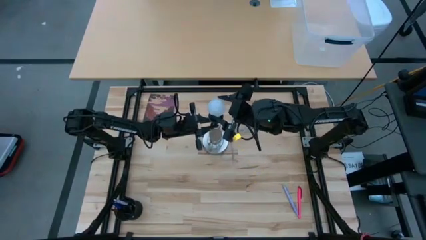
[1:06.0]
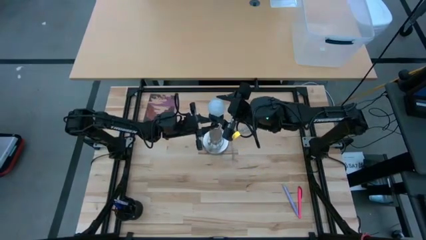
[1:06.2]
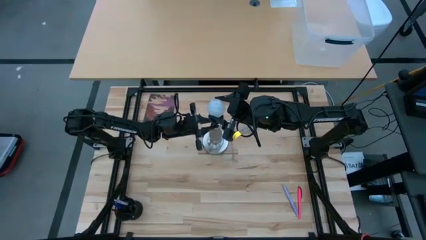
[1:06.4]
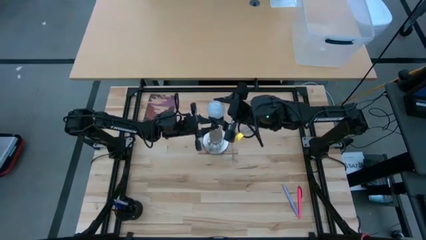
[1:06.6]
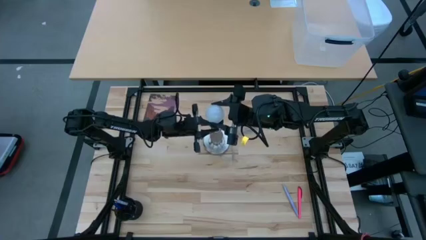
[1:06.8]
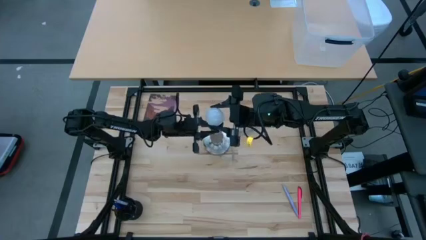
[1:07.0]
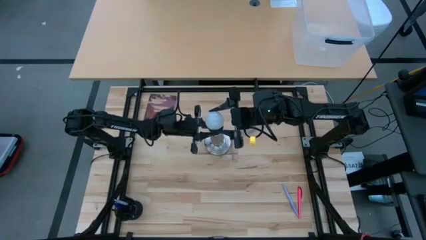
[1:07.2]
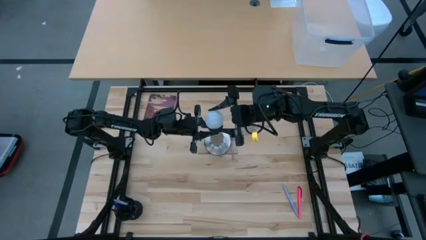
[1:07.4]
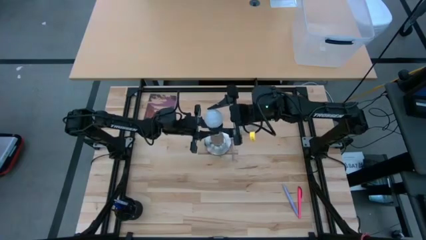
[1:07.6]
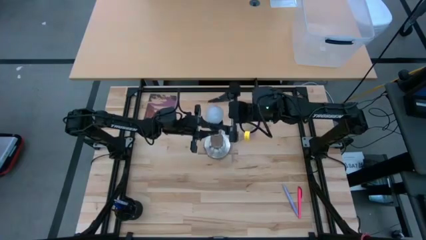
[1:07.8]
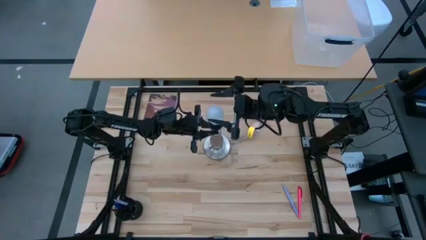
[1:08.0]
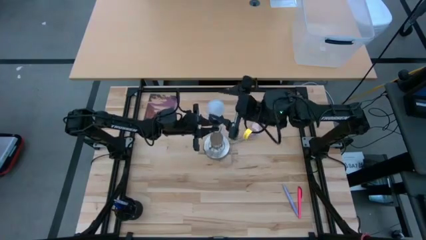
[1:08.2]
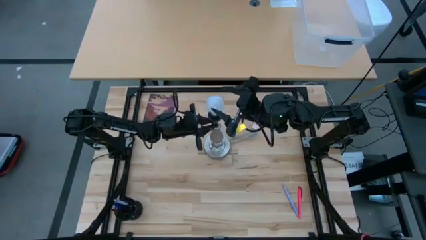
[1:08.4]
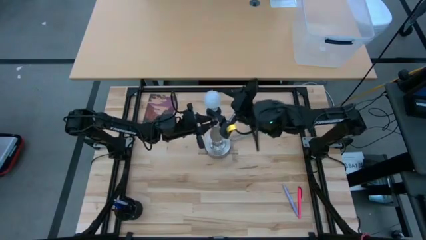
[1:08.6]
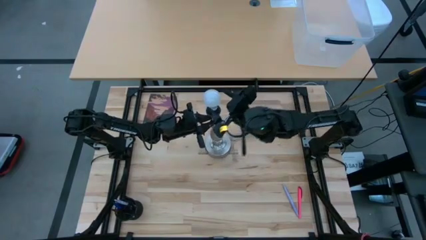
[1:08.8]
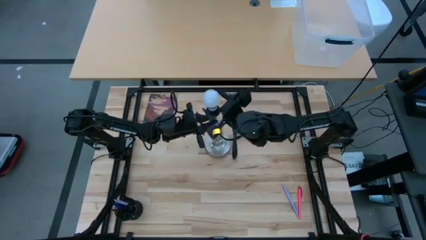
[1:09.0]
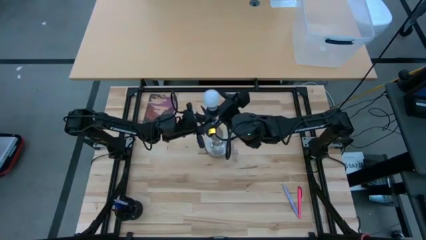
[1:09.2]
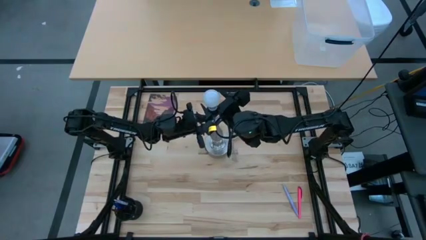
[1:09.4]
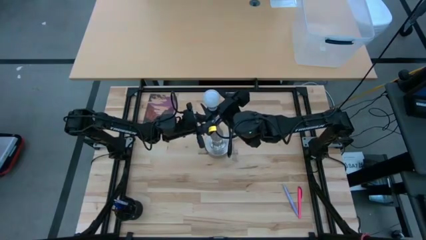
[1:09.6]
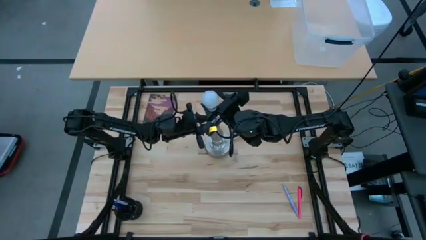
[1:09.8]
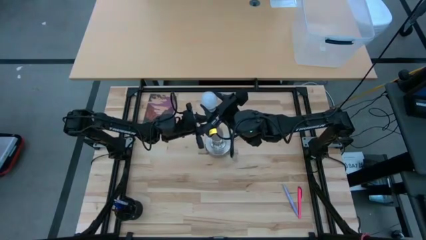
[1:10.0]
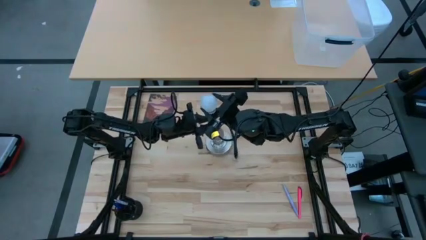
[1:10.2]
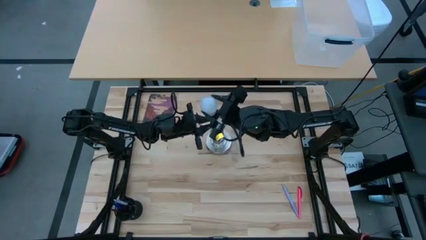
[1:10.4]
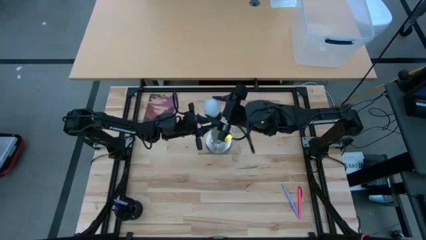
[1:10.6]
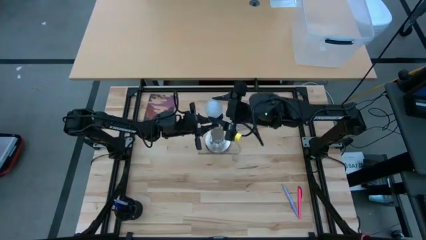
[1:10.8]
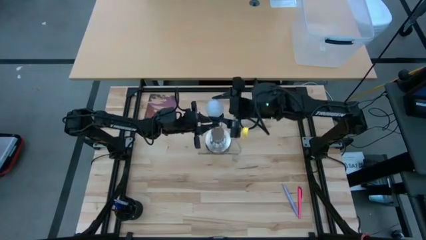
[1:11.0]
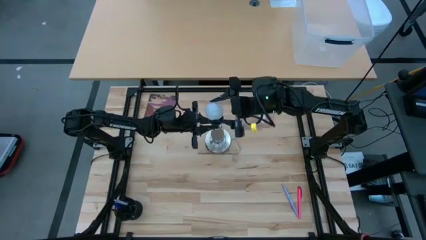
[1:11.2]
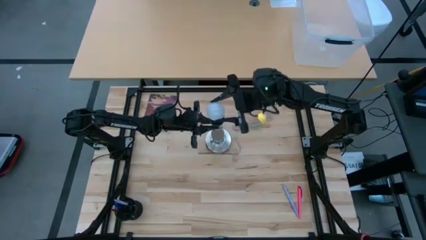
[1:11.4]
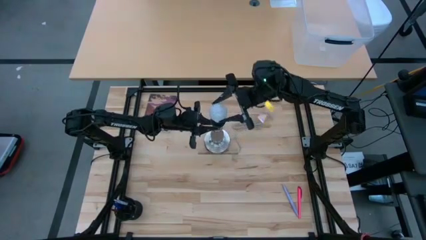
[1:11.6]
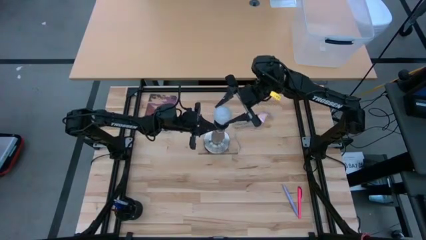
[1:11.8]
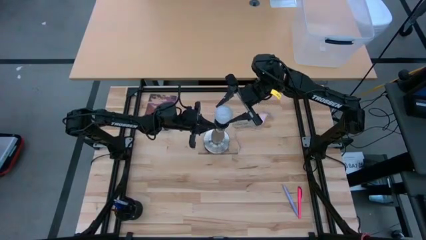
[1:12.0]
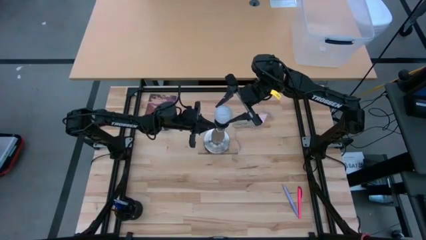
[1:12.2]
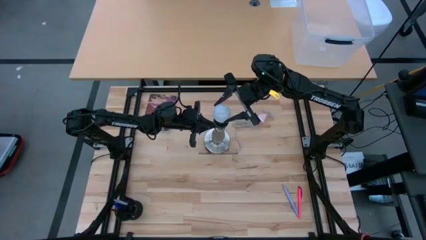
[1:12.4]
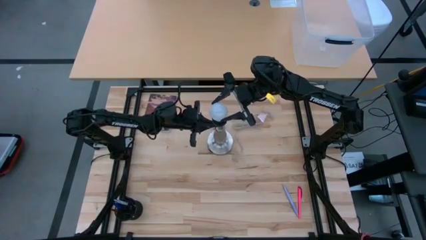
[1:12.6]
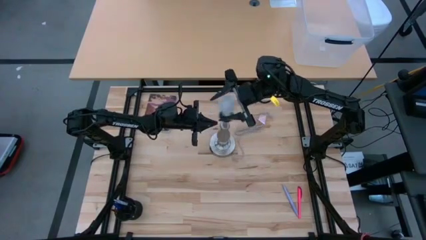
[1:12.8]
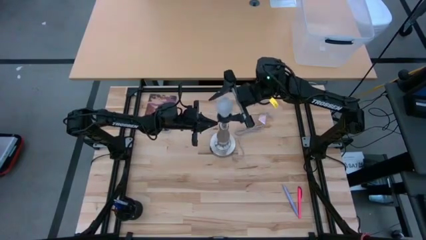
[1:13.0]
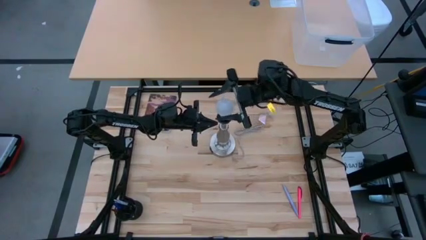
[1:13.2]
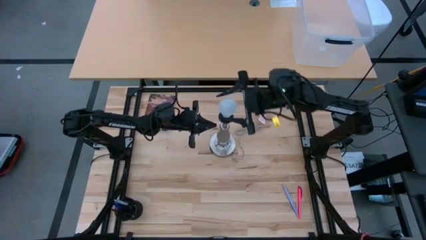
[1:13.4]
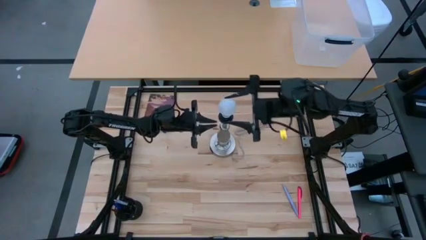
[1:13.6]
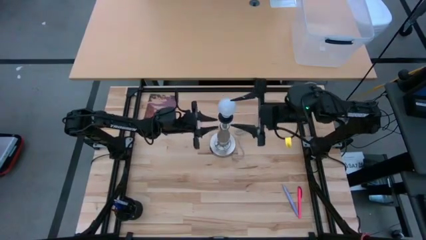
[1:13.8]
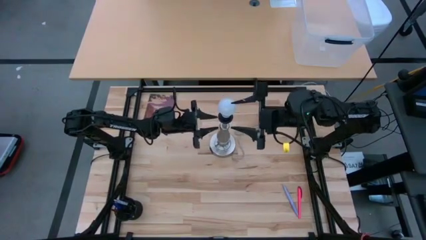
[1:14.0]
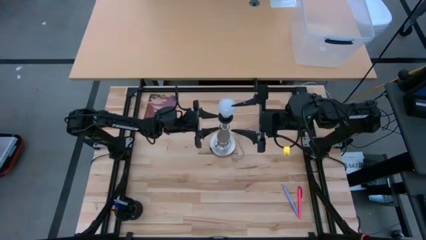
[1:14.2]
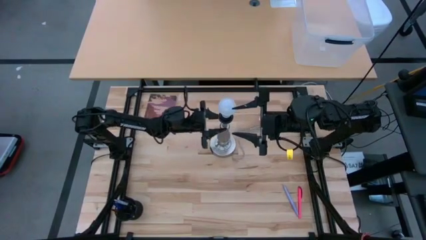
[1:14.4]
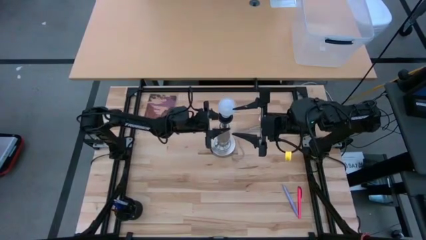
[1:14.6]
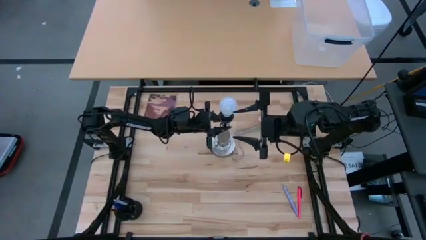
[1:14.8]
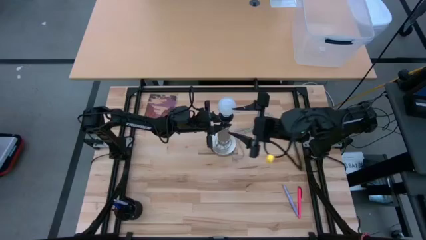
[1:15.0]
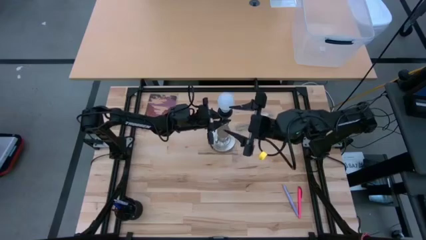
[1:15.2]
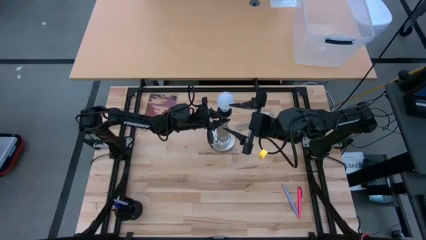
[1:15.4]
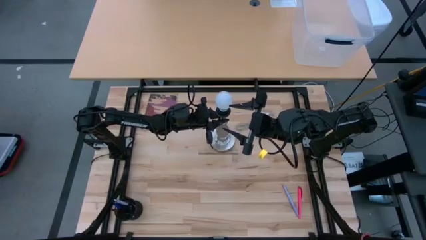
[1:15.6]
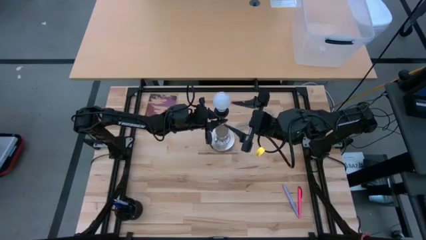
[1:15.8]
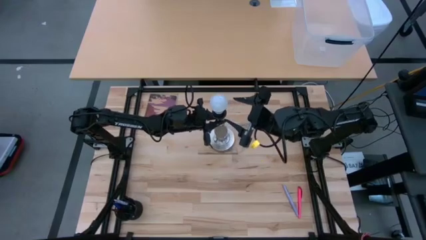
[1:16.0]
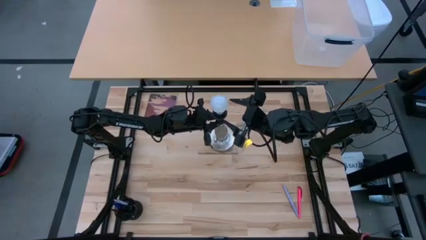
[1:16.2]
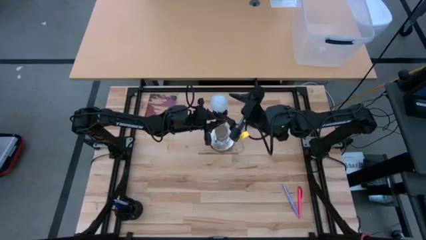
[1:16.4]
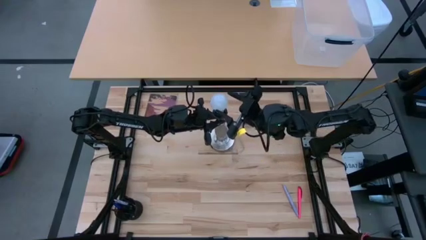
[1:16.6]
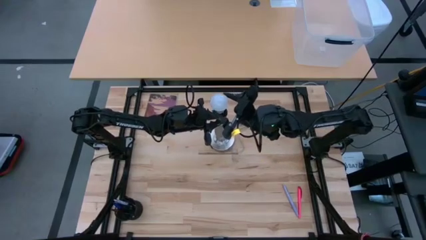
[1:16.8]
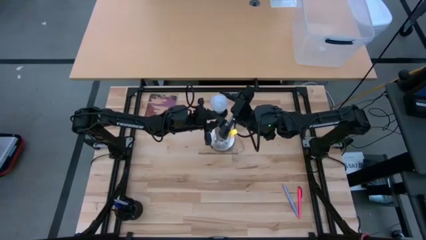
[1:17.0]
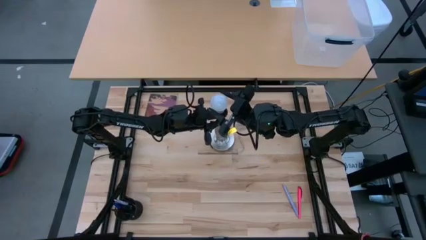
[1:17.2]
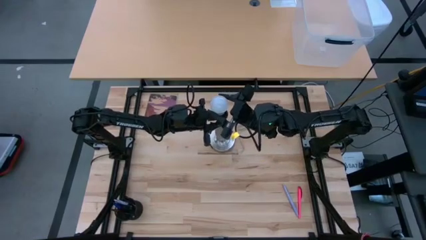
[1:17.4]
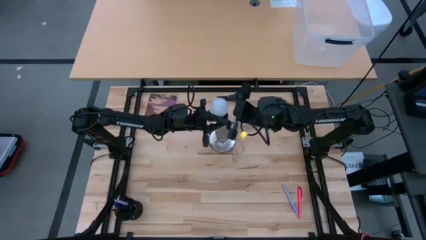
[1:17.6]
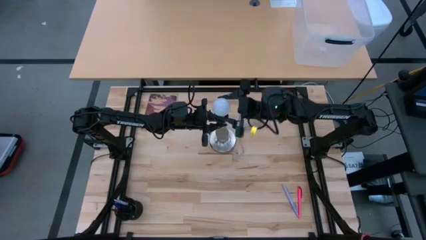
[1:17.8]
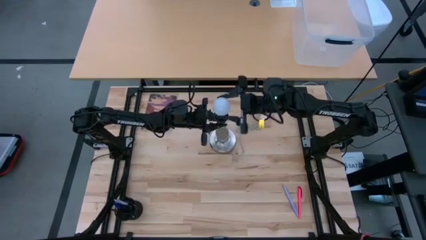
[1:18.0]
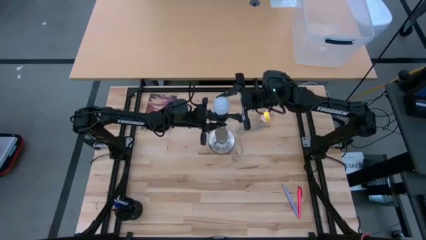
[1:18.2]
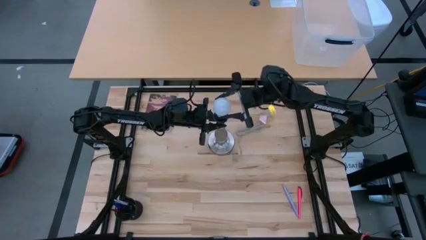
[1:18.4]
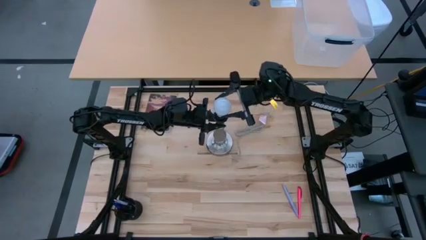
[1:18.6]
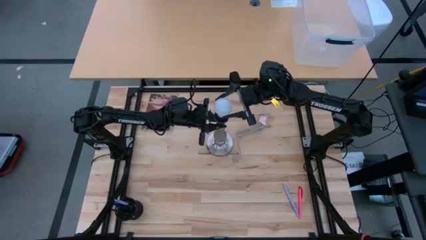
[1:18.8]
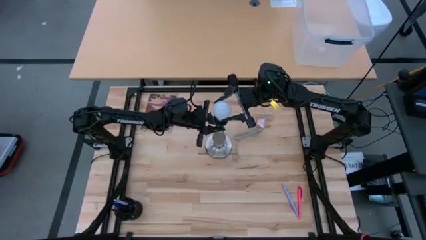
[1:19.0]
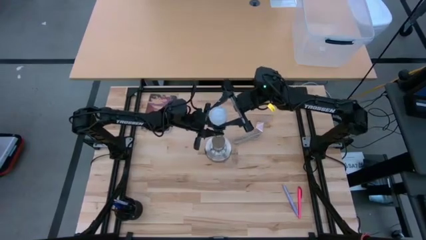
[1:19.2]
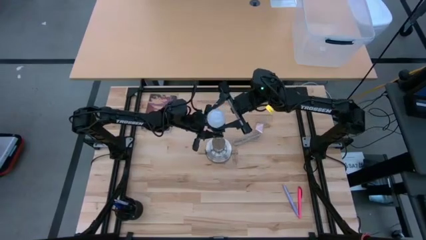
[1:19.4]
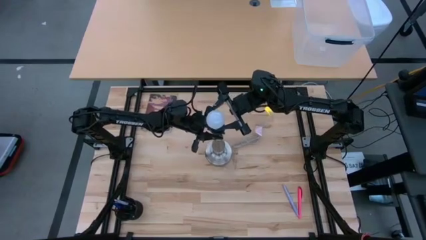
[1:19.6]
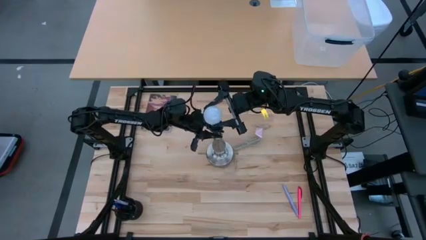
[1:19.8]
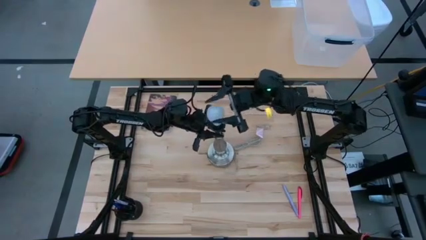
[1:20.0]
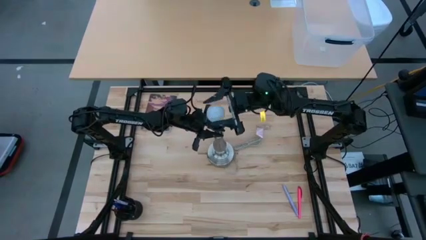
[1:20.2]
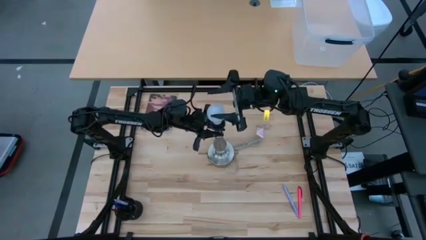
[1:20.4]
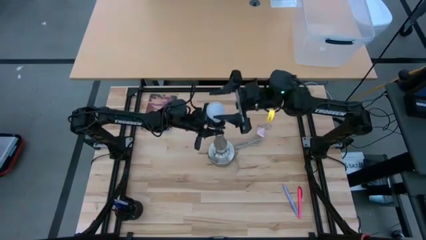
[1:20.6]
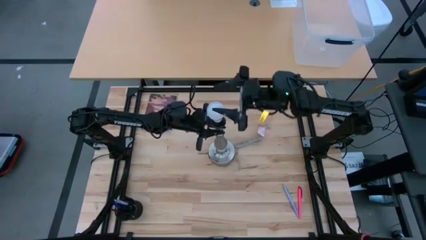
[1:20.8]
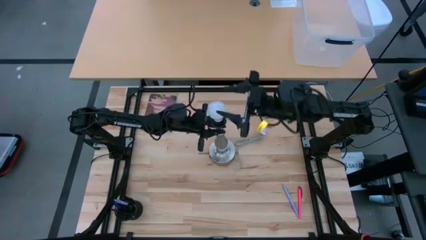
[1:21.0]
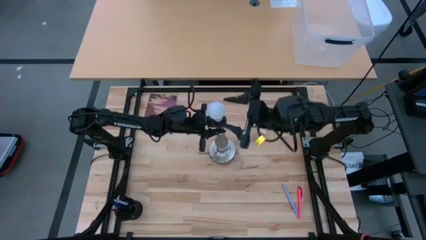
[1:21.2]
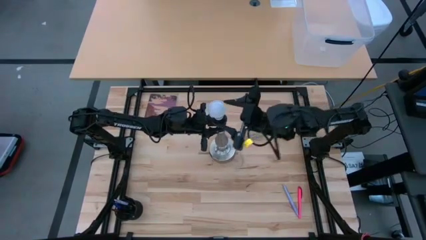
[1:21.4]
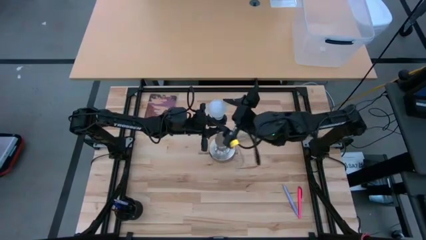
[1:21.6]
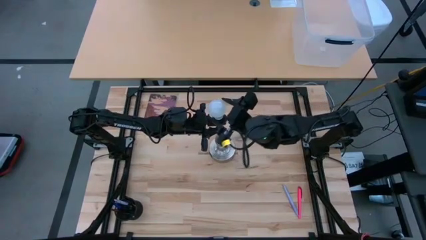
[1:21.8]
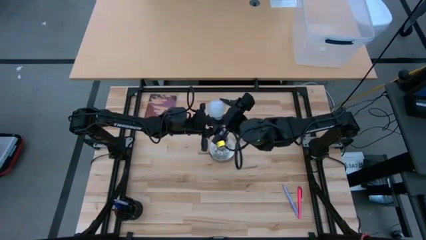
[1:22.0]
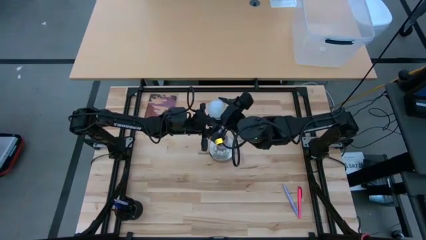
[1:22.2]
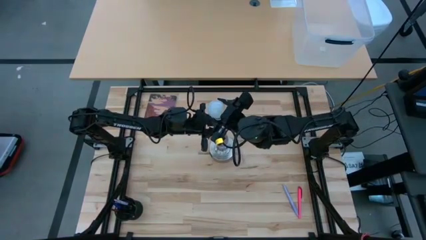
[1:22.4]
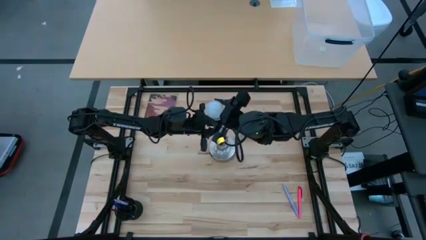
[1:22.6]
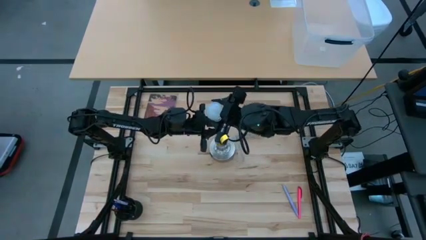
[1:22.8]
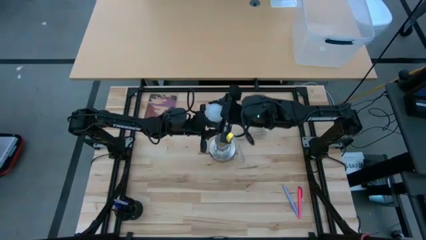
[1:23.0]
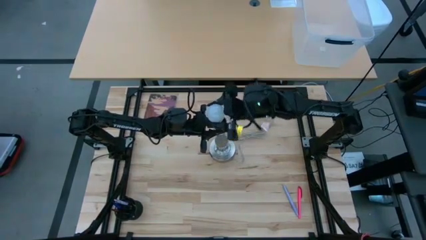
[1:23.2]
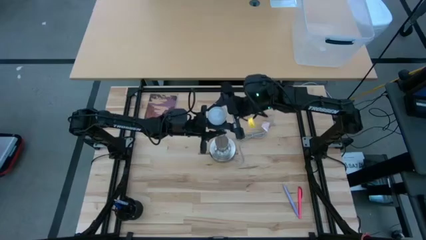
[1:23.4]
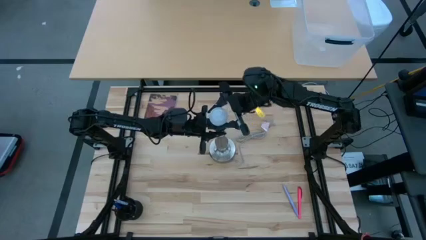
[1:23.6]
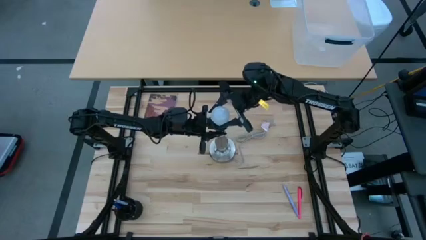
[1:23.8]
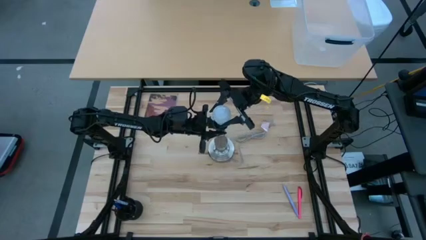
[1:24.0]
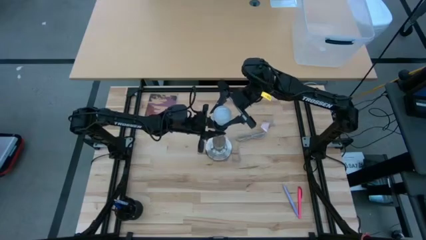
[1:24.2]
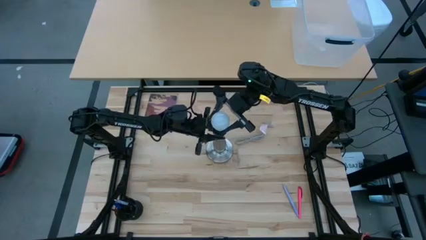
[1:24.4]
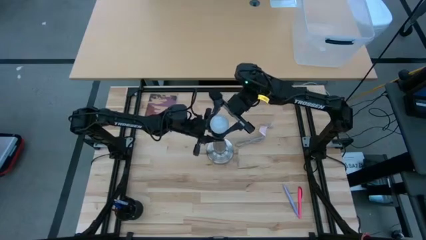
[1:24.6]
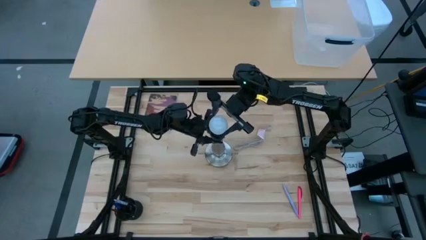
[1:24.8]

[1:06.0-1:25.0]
Task: Screw lightbulb
Remove the lightbulb from the lamp
